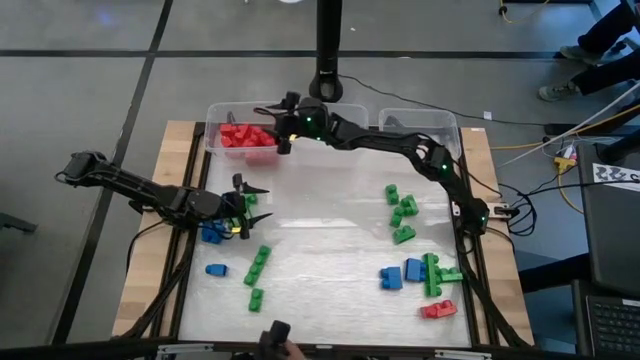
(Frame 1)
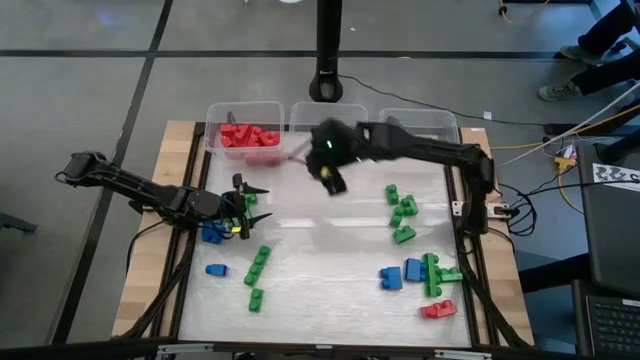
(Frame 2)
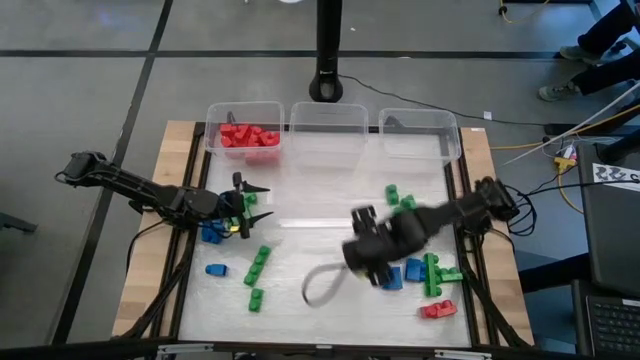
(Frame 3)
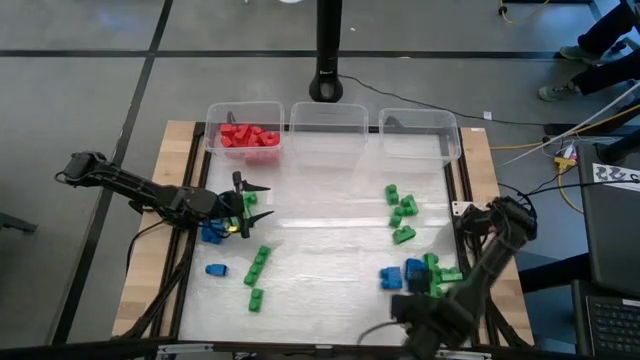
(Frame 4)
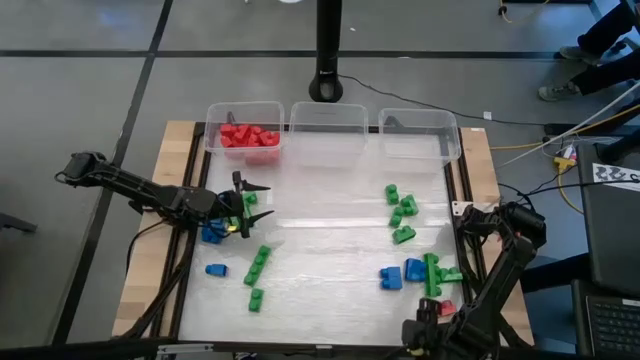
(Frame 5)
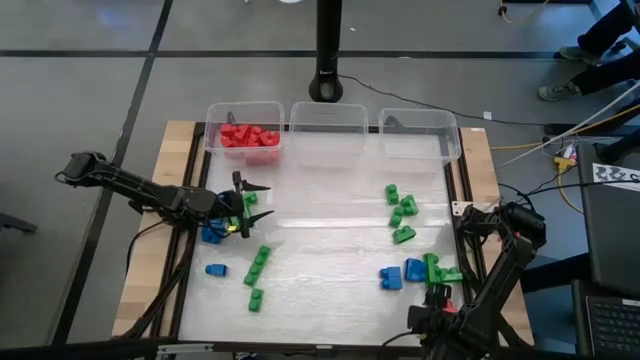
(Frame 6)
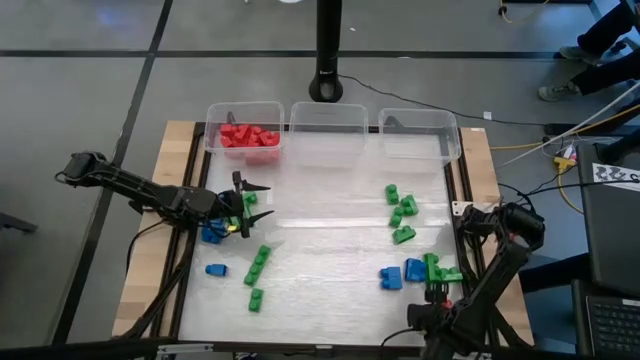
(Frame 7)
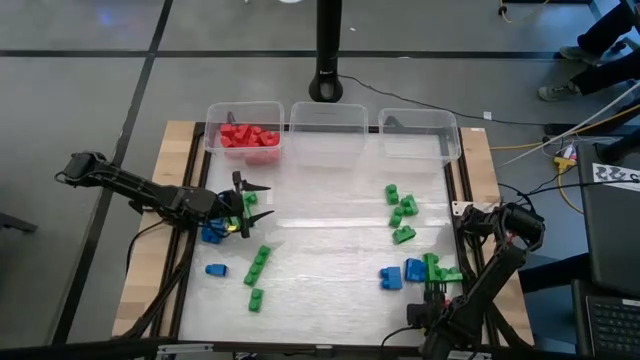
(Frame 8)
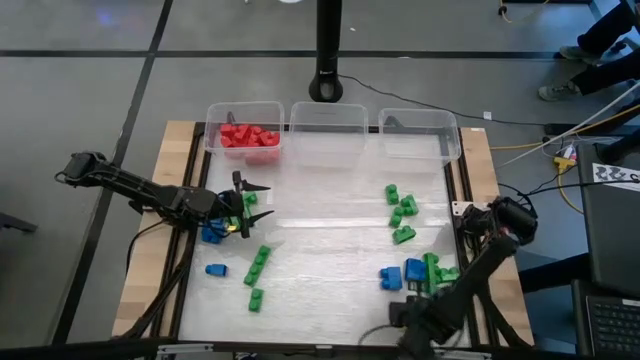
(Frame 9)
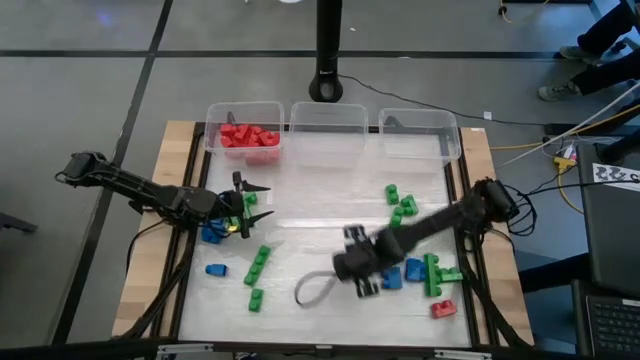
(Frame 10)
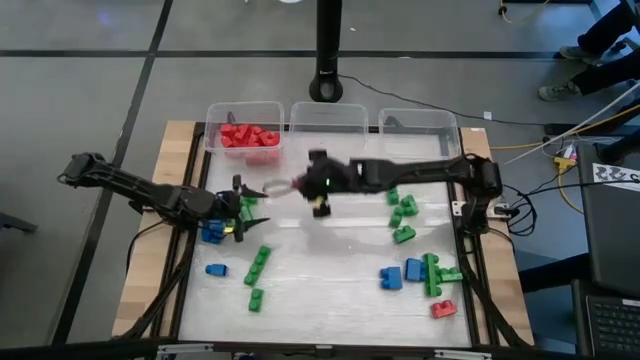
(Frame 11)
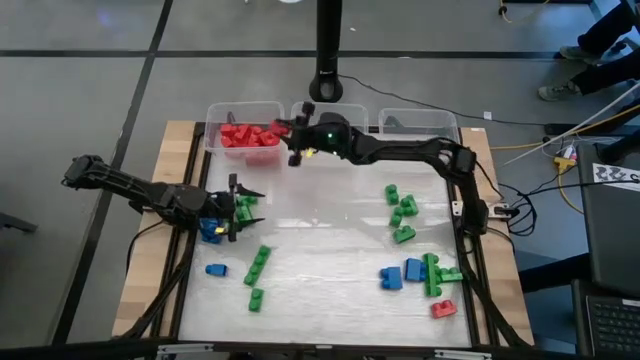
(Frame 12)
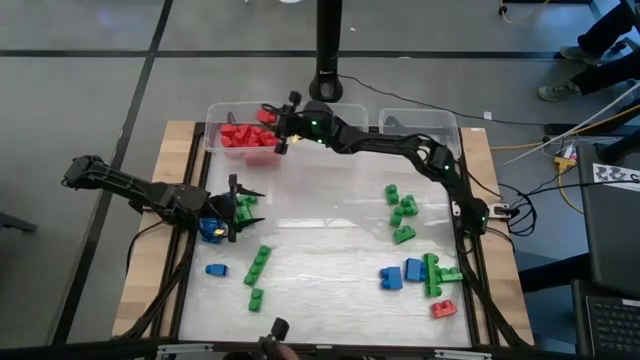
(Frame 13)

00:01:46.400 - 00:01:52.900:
Task: Sort blocks
Put the red game piece into the left transparent bin

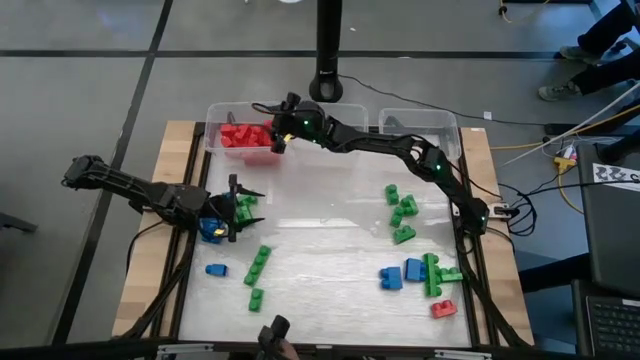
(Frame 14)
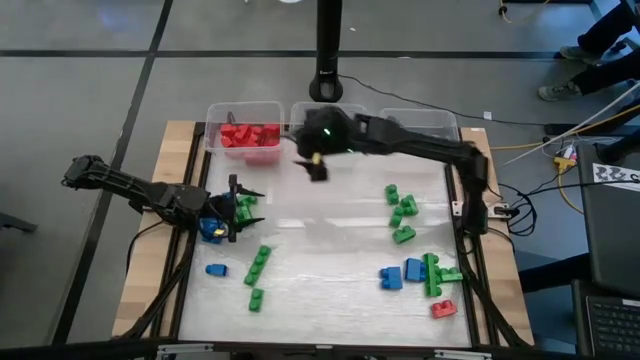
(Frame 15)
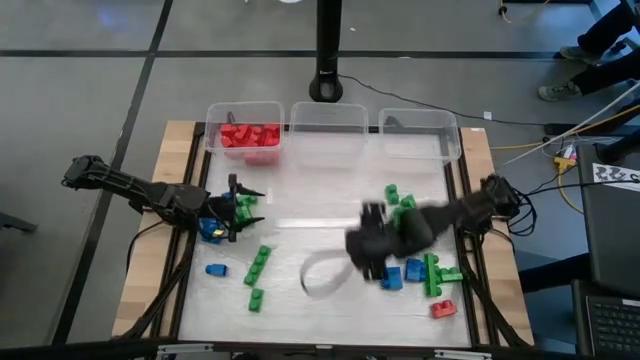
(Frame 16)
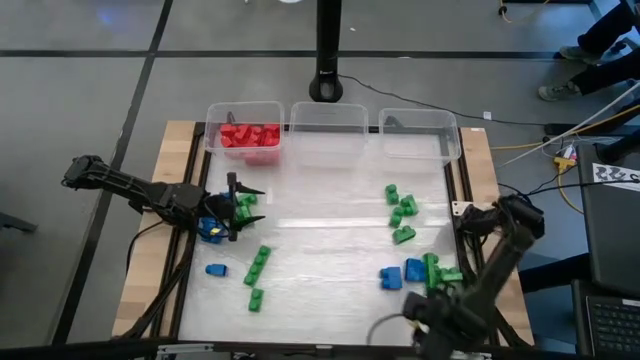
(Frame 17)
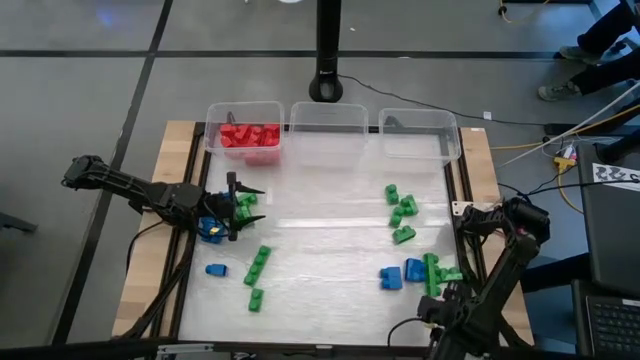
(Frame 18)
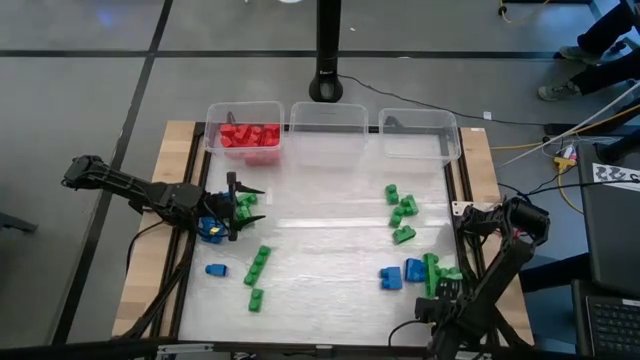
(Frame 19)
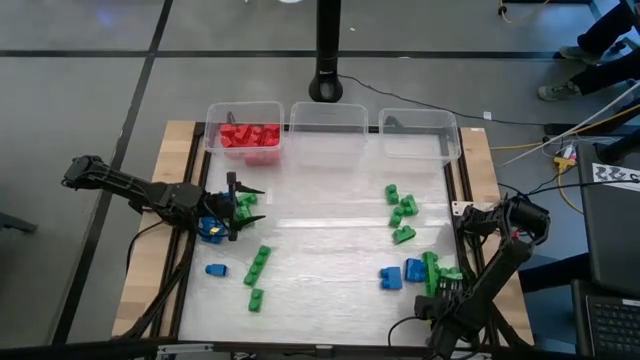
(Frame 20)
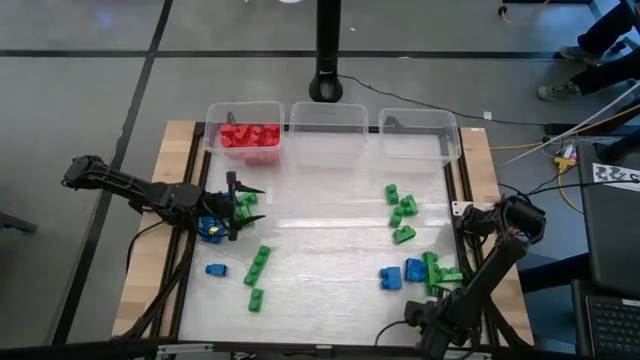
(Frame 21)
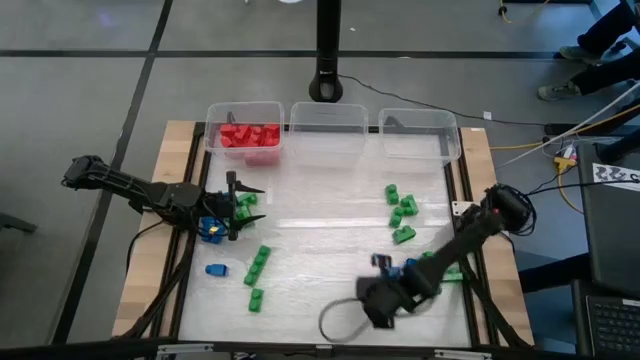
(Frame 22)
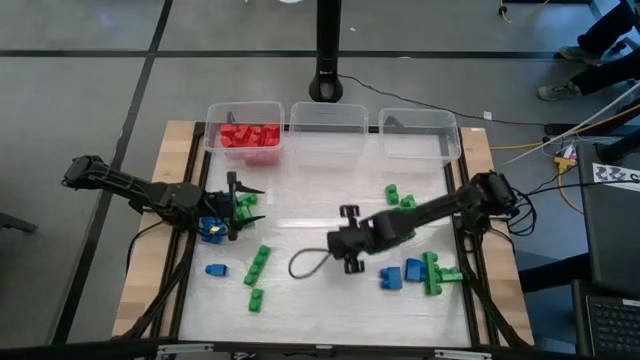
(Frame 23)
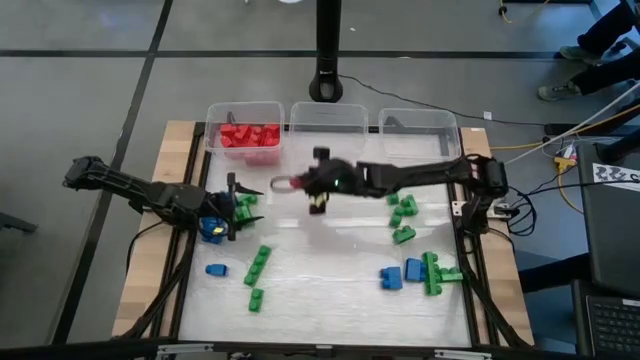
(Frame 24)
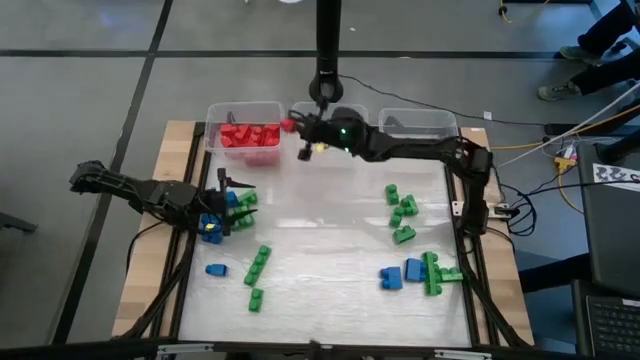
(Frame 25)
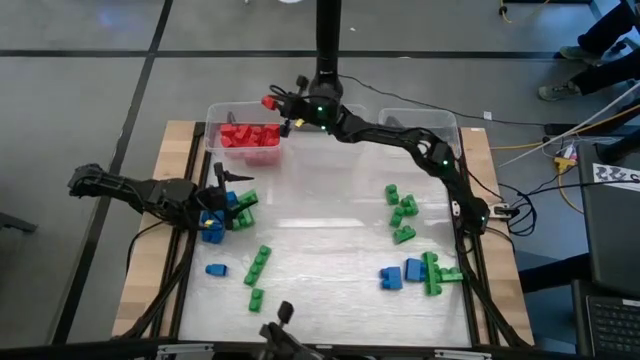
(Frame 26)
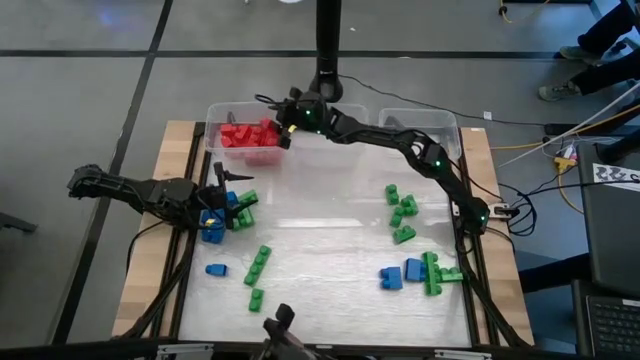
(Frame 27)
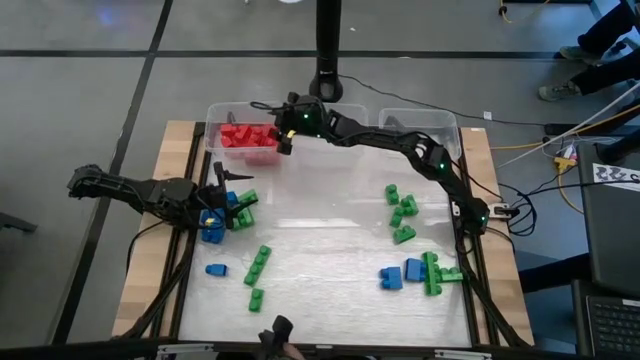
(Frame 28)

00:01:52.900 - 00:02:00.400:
Put the red game piece into the left transparent bin

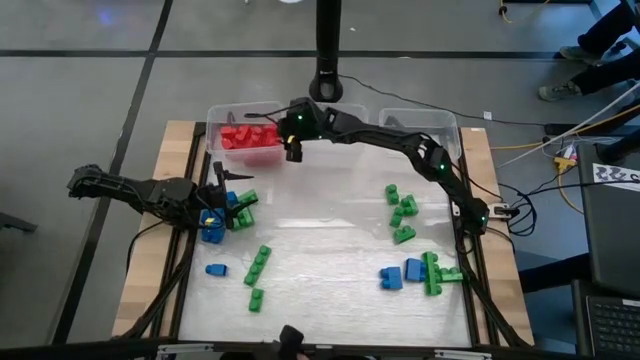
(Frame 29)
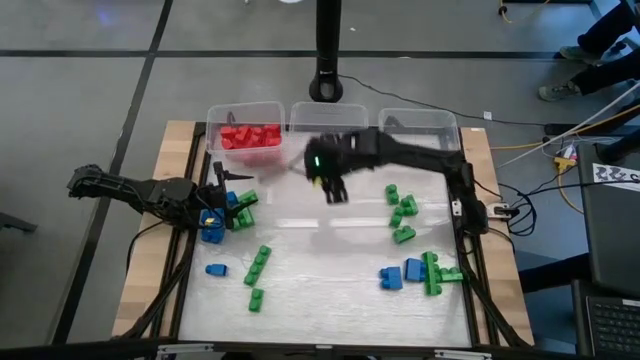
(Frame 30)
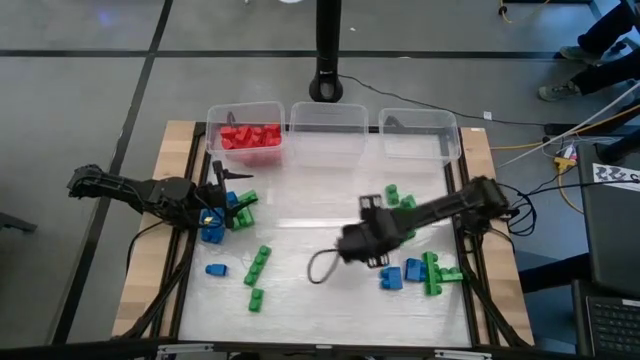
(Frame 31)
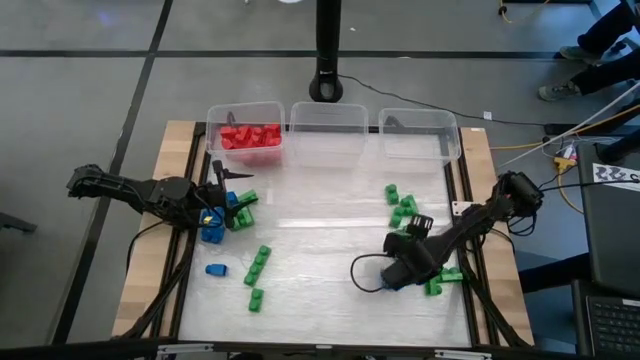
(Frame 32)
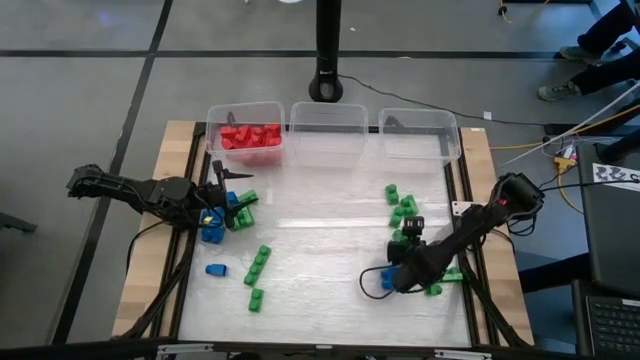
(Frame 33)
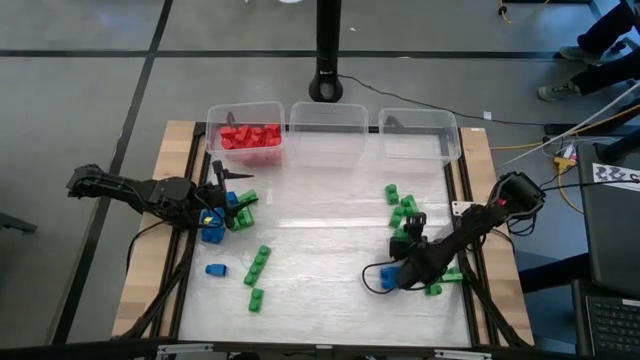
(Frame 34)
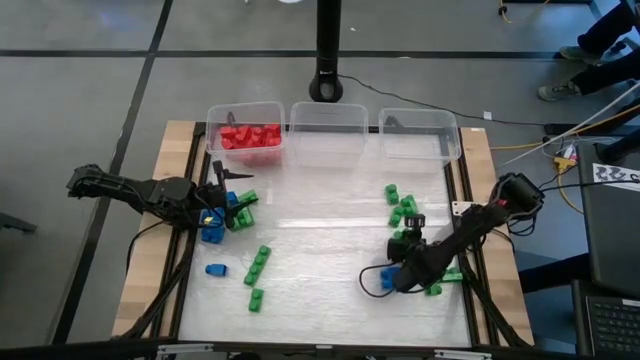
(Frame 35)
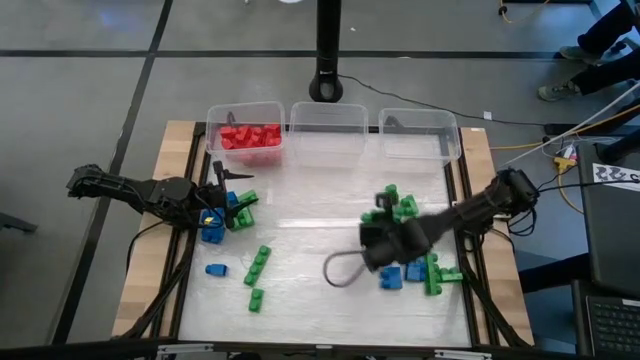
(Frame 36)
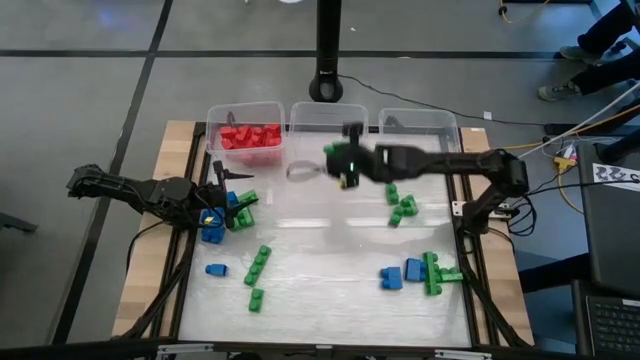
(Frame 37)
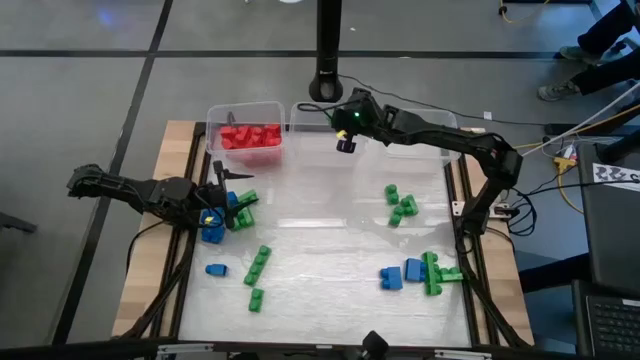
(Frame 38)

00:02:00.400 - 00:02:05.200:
Put the green game piece into the middle transparent bin

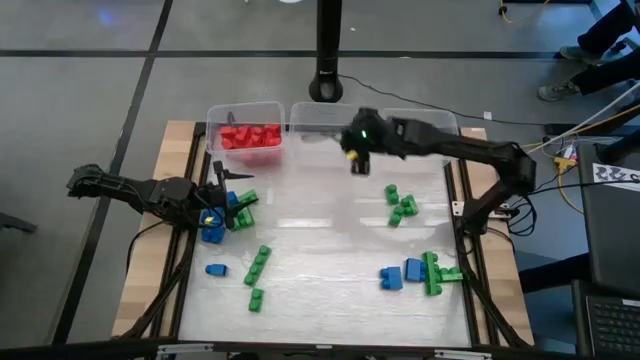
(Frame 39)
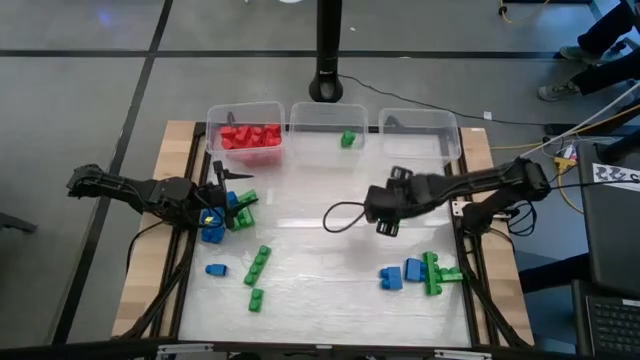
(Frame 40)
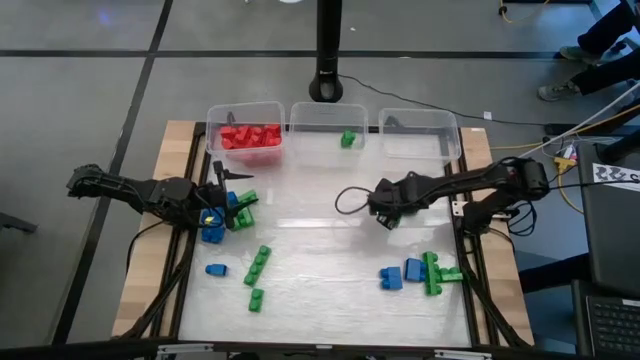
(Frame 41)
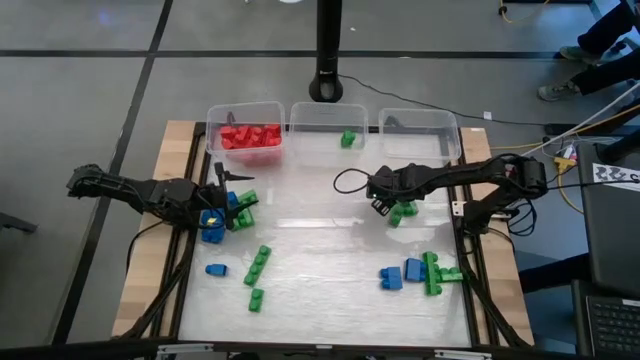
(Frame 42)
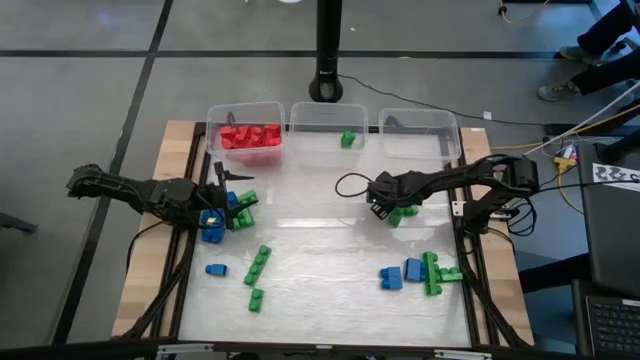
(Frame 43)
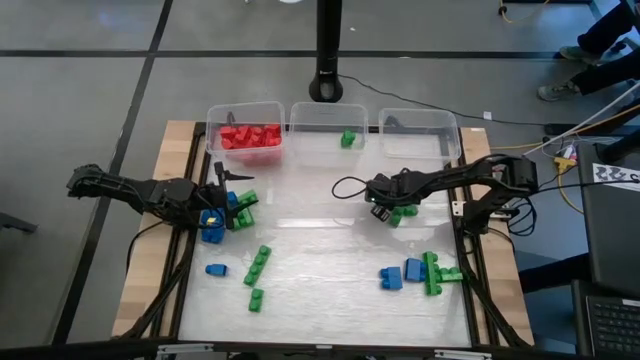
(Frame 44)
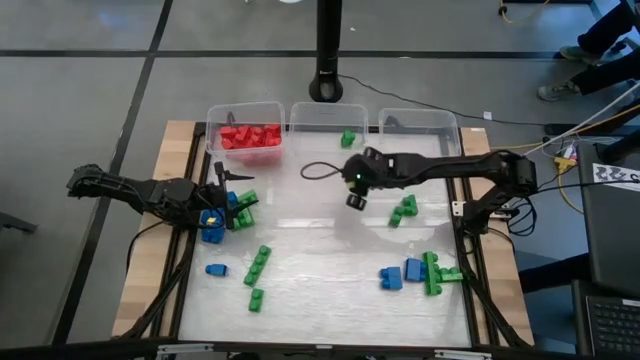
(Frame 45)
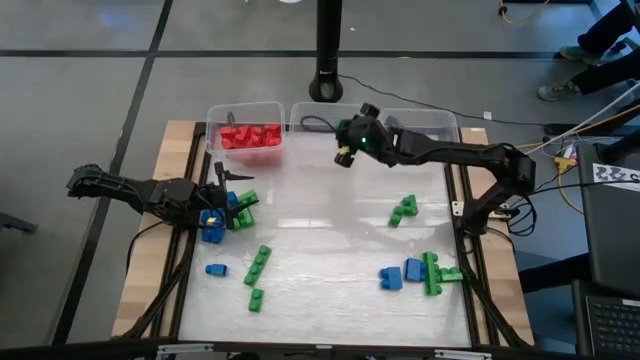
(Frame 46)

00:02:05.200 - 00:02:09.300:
Put the green game piece into the middle transparent bin
